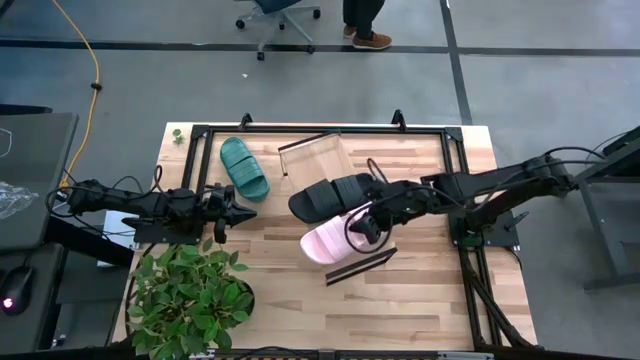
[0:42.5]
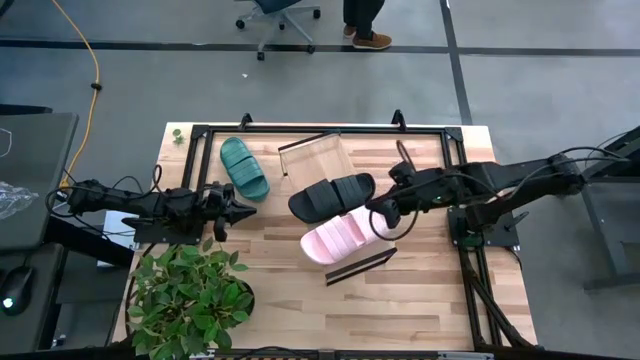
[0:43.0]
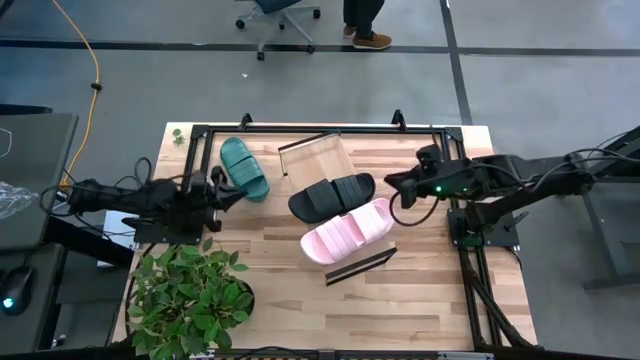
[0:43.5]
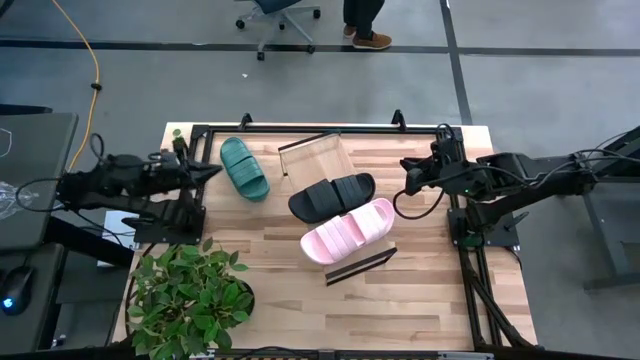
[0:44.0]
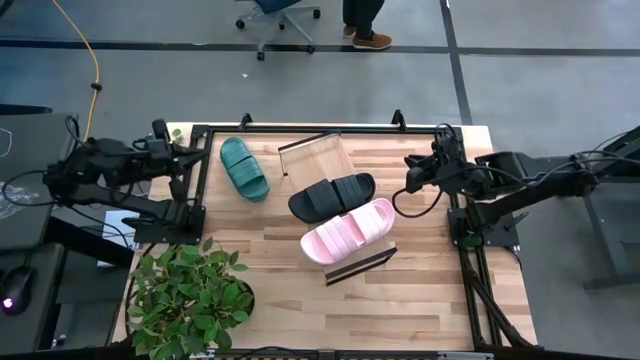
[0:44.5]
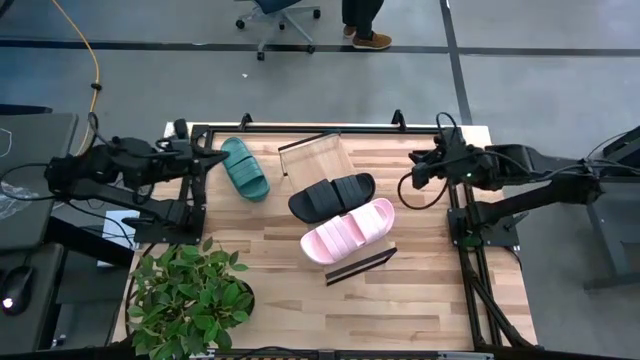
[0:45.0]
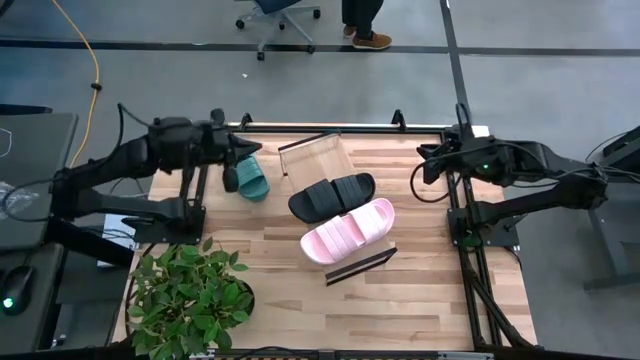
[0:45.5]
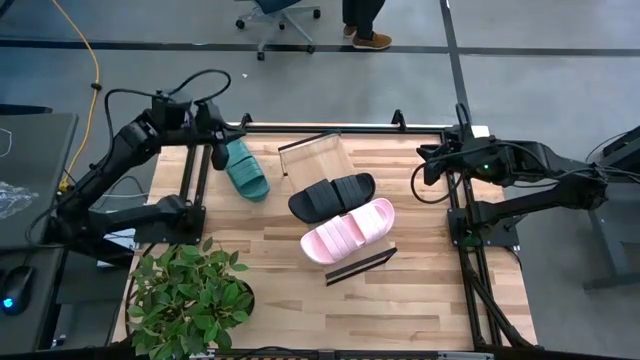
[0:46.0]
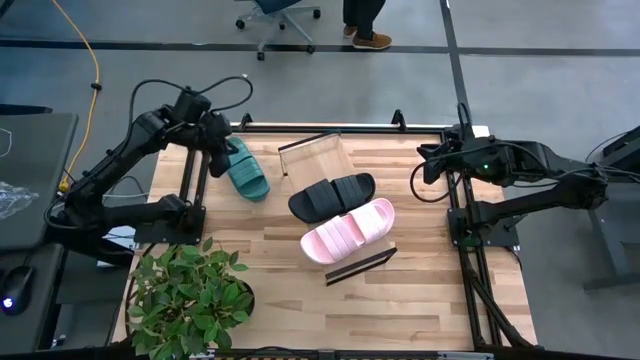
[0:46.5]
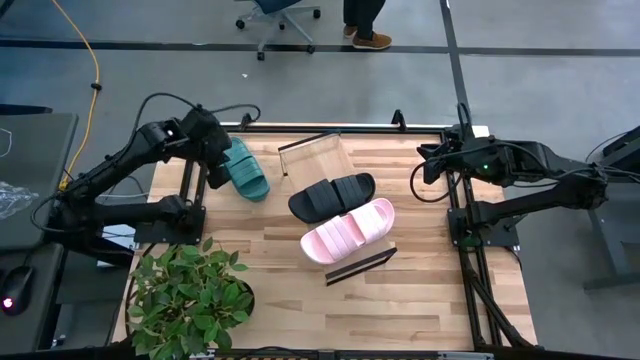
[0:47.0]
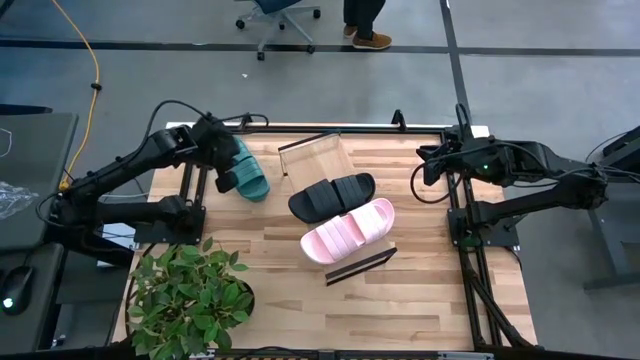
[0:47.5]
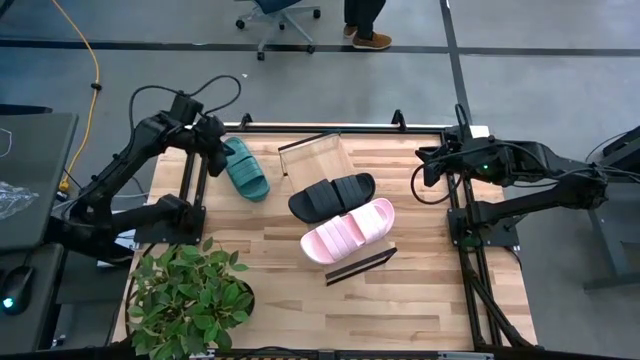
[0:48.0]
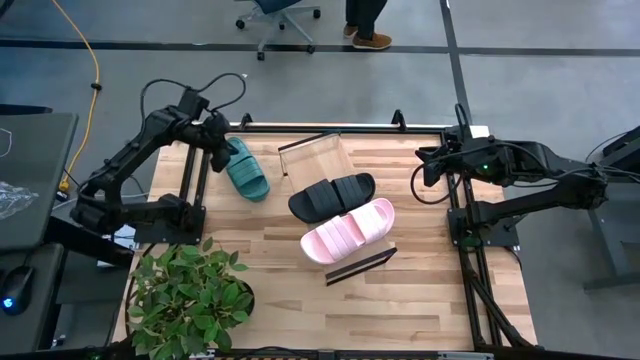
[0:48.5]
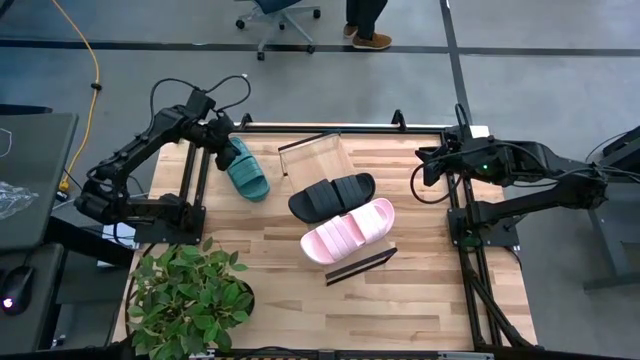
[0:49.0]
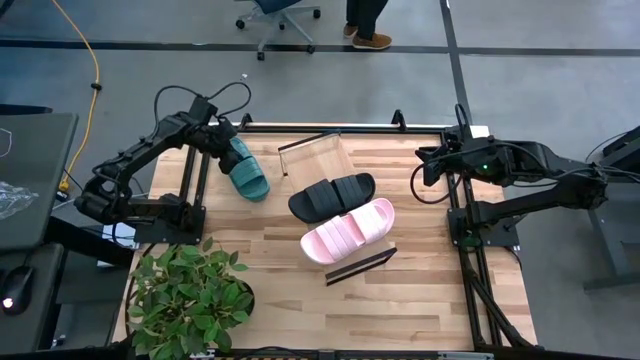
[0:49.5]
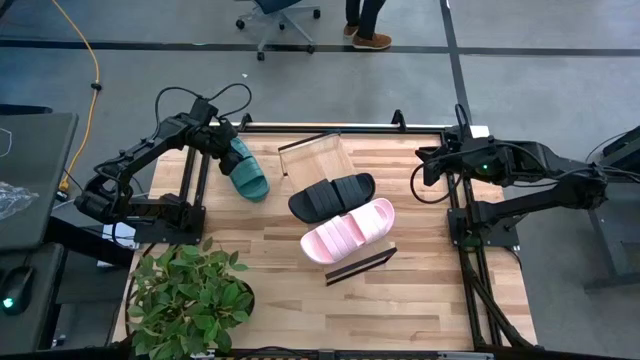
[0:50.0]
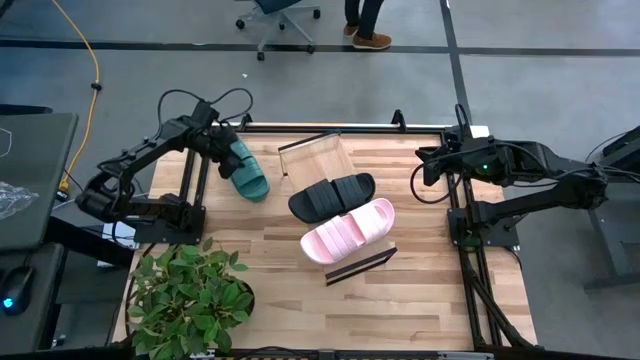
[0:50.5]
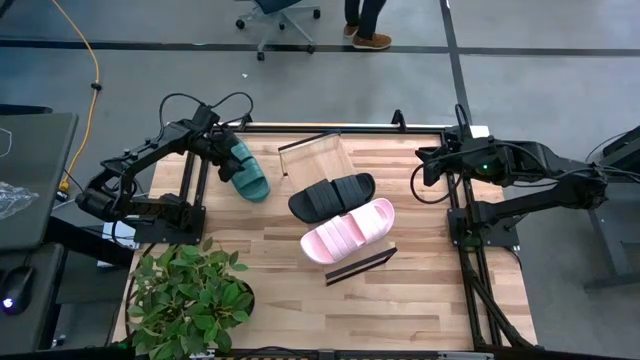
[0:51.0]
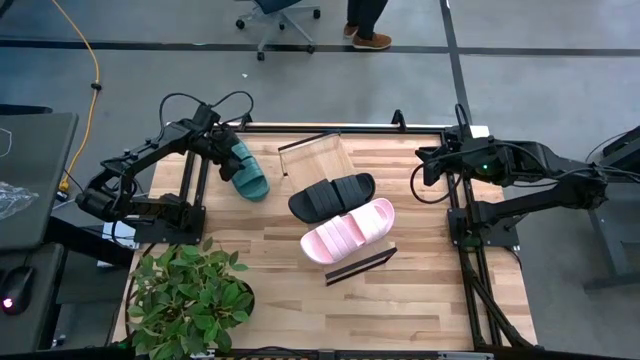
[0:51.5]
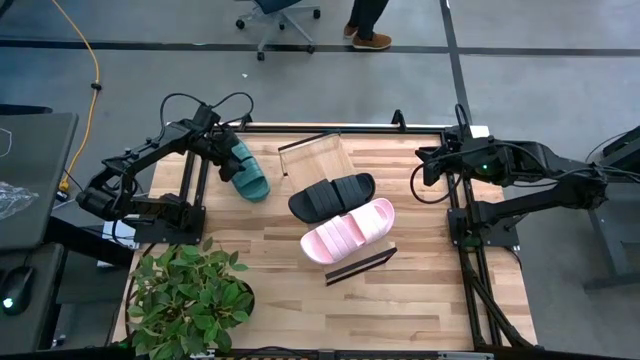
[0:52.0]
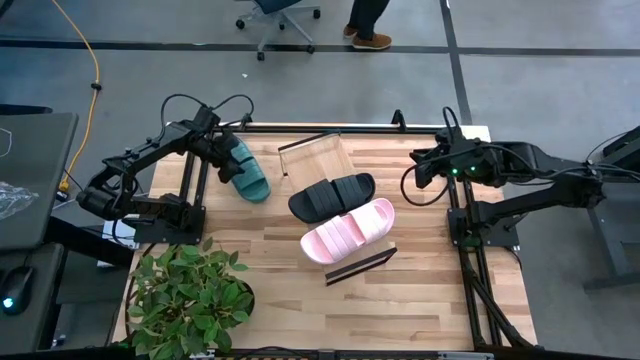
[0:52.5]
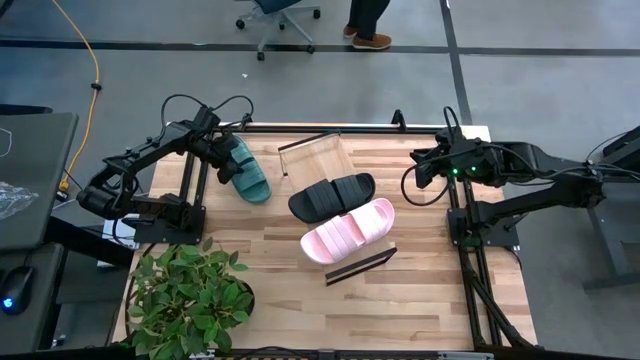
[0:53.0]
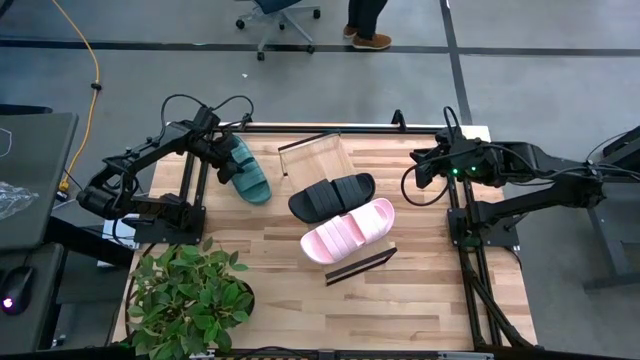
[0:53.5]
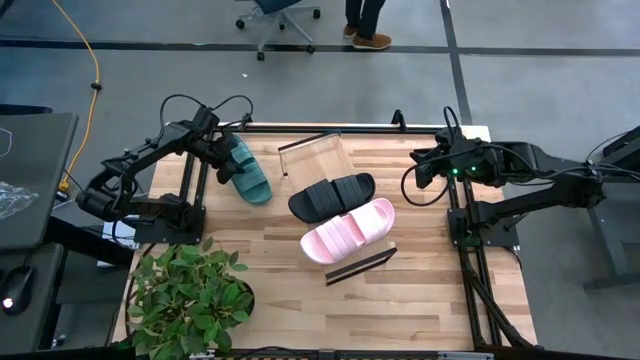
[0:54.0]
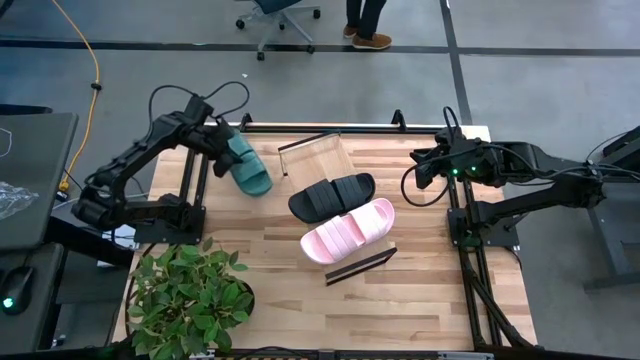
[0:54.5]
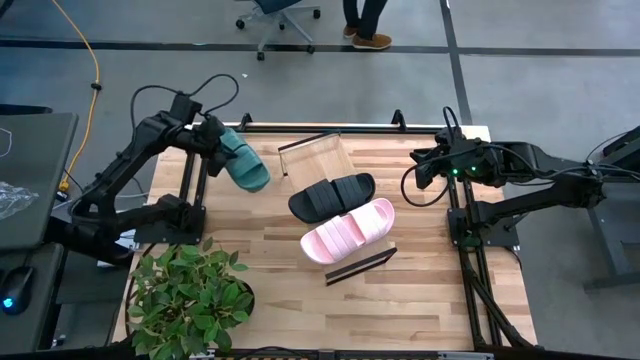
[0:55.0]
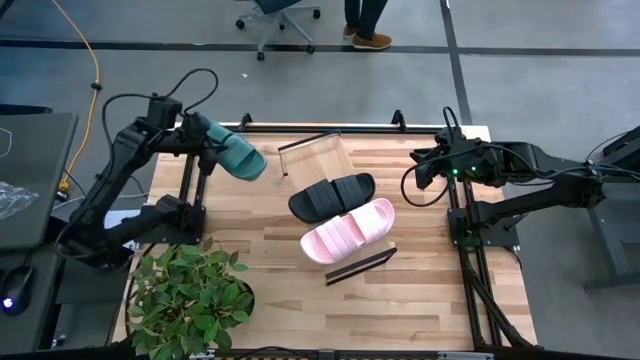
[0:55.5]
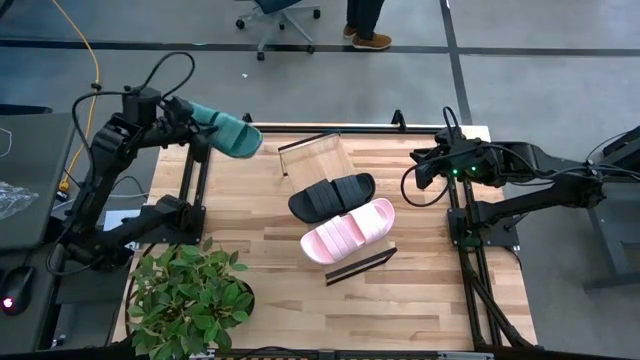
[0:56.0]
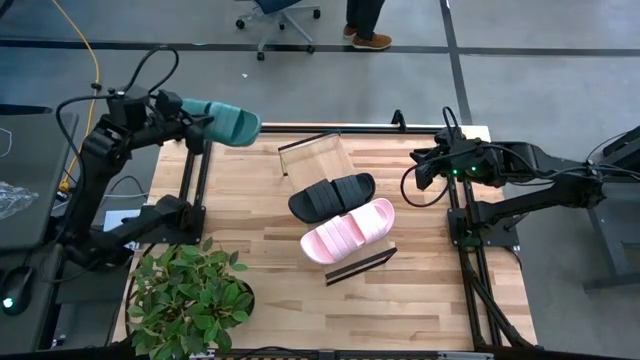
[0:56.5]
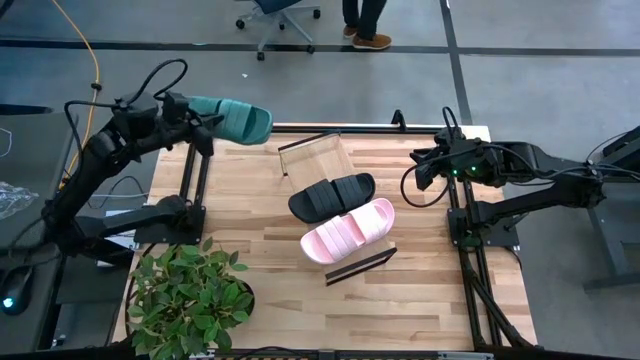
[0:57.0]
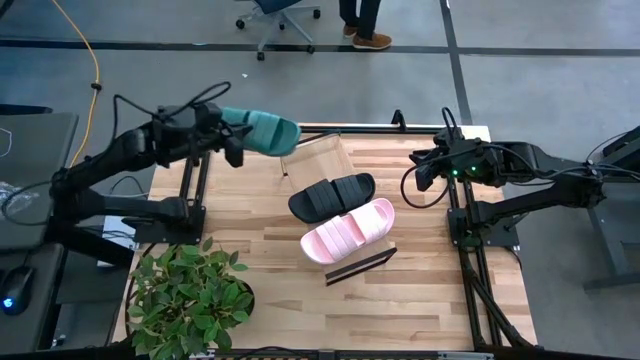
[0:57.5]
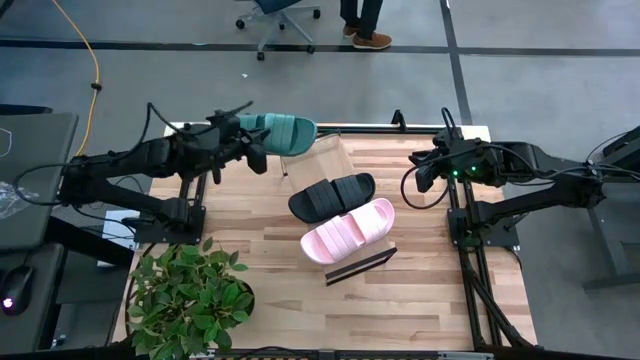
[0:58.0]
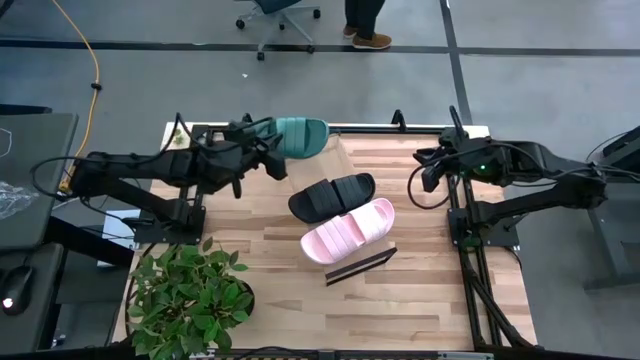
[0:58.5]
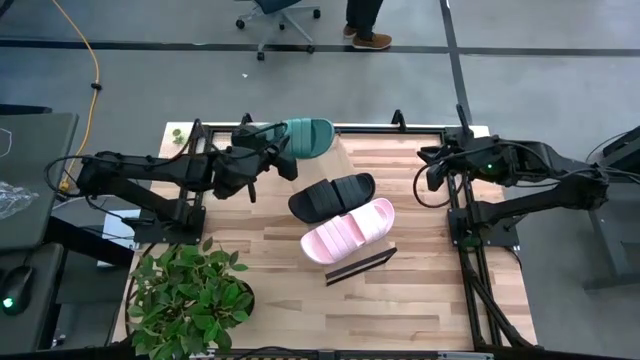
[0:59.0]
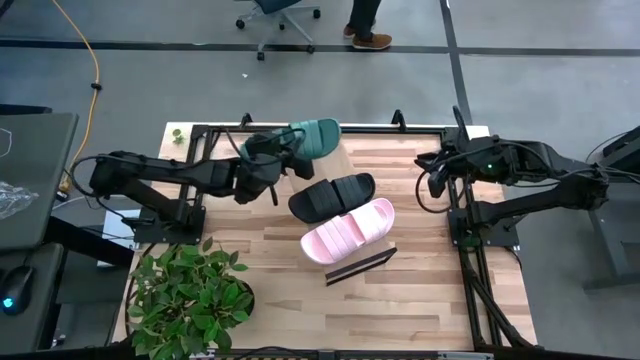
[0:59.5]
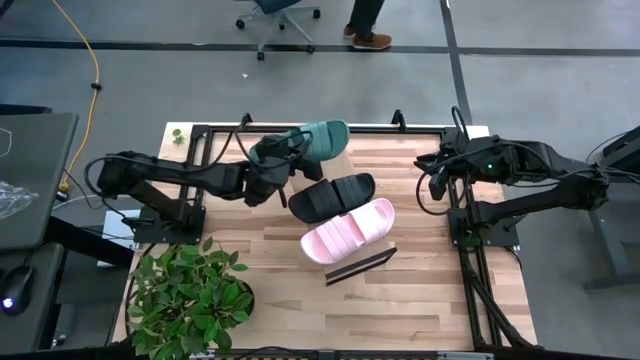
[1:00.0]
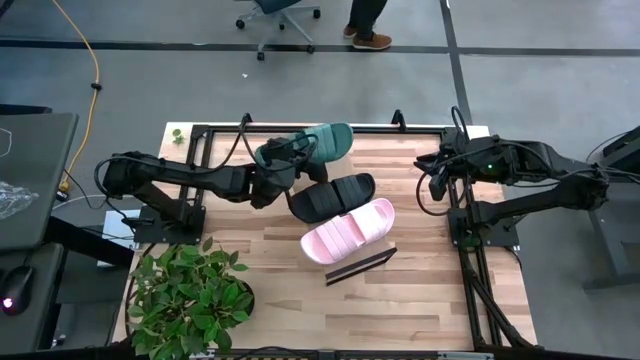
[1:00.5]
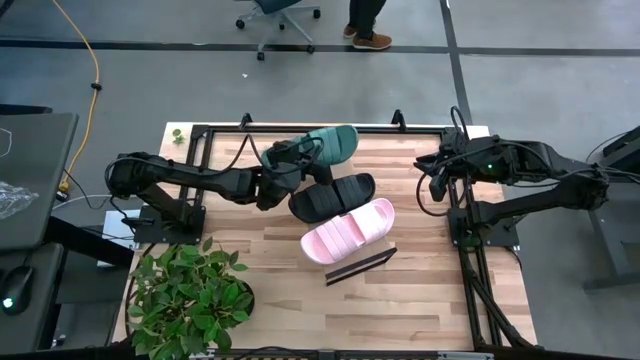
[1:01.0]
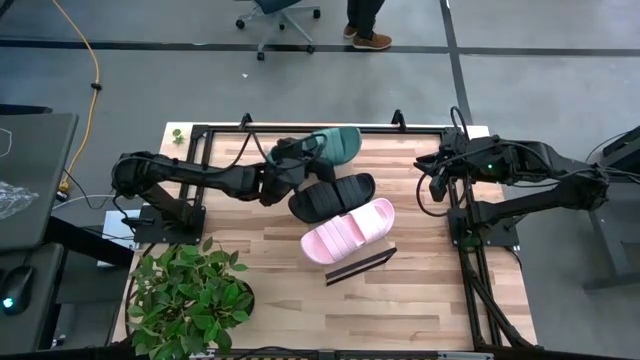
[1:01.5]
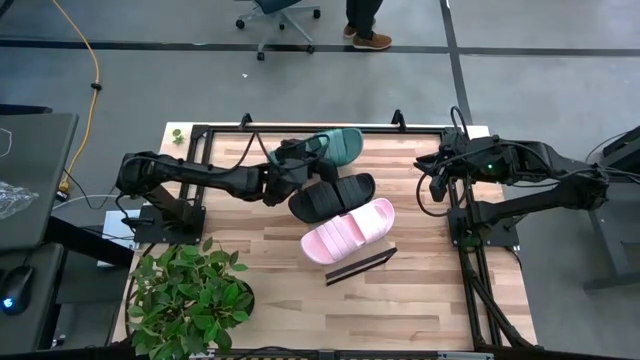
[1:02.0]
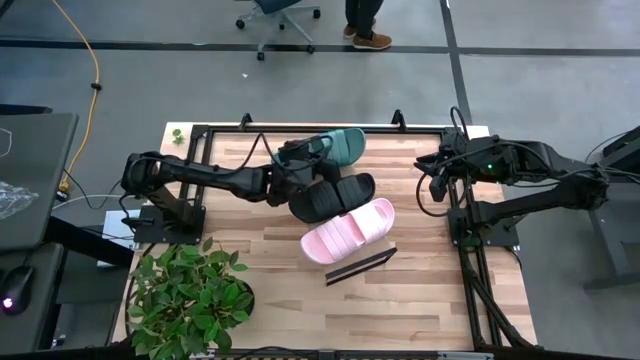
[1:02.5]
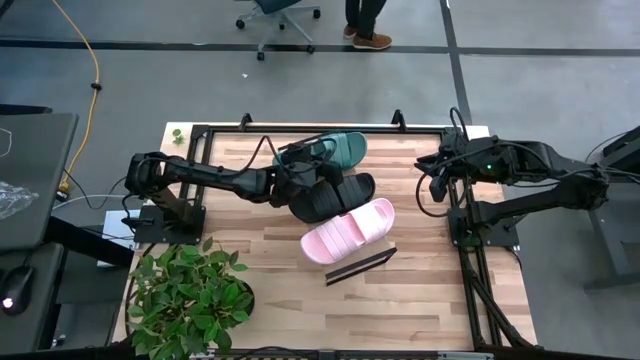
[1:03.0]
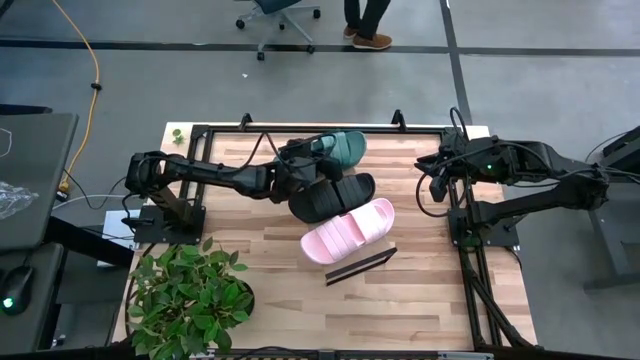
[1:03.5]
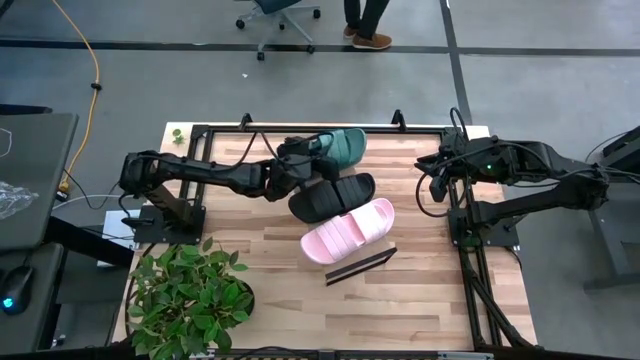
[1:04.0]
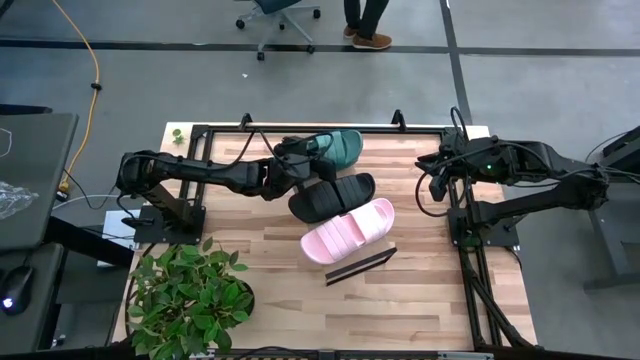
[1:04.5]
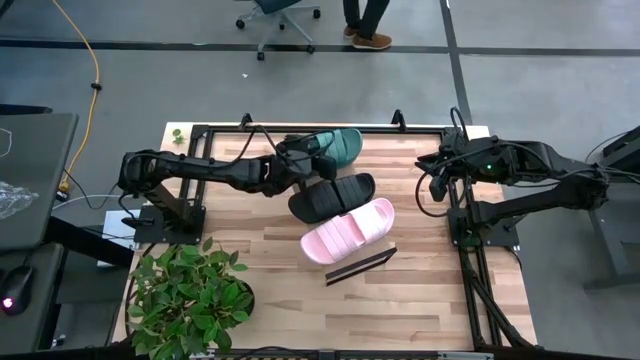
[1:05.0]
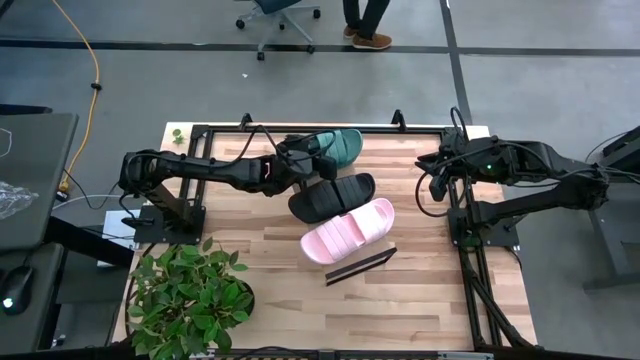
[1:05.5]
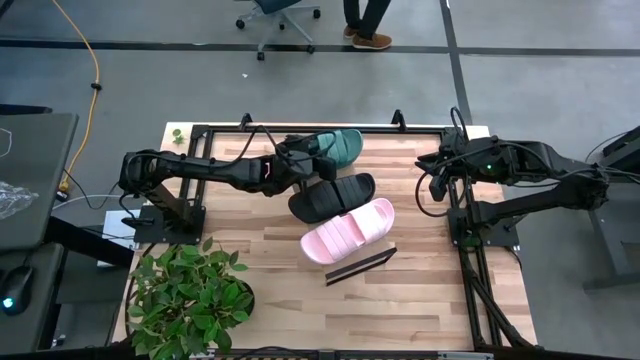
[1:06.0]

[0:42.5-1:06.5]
Task: Pick and place slides into the shelf
Put the green pair of slides on the shelf
